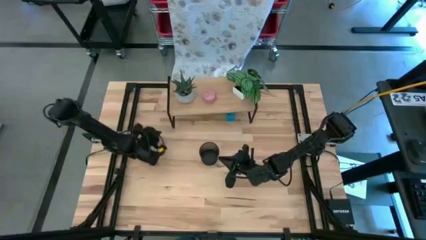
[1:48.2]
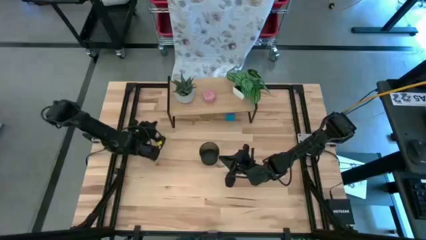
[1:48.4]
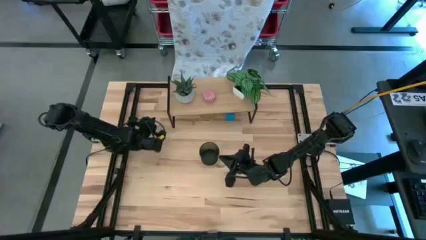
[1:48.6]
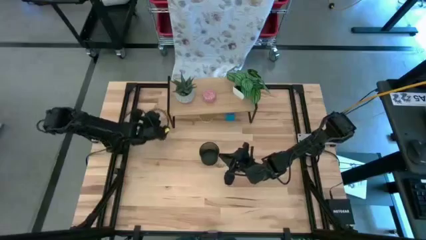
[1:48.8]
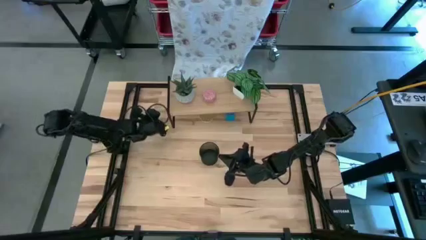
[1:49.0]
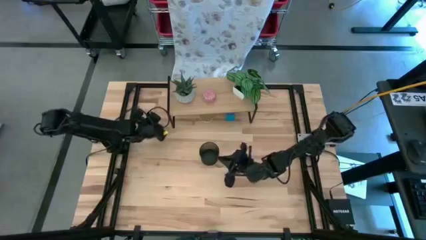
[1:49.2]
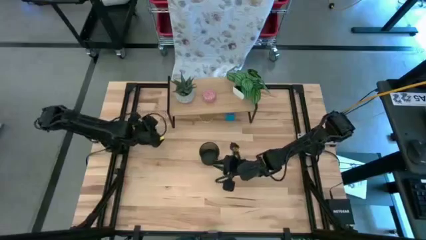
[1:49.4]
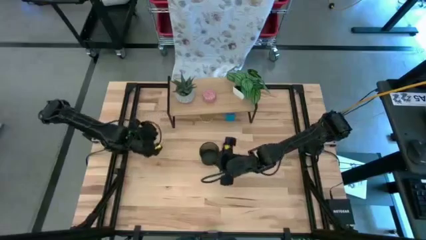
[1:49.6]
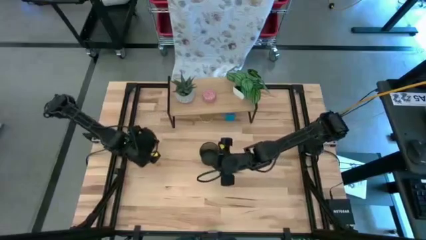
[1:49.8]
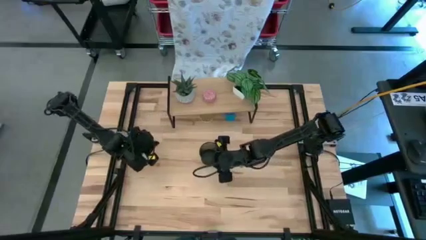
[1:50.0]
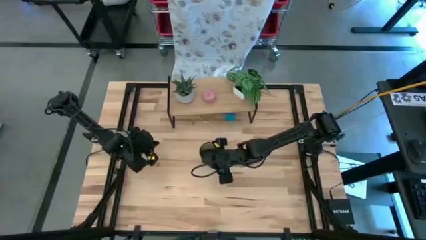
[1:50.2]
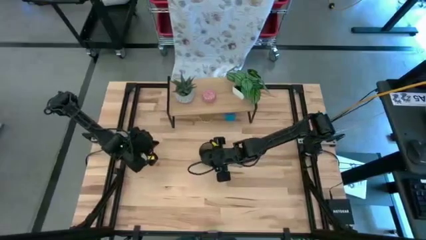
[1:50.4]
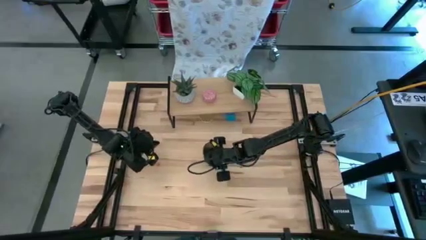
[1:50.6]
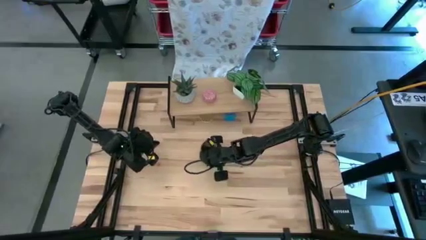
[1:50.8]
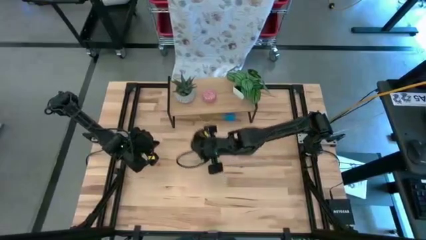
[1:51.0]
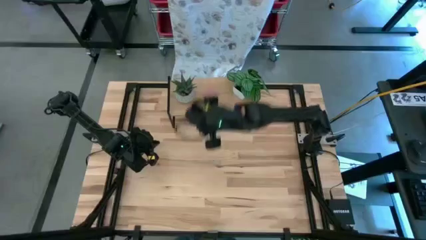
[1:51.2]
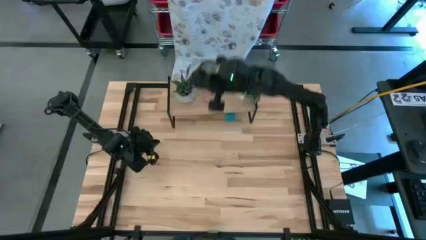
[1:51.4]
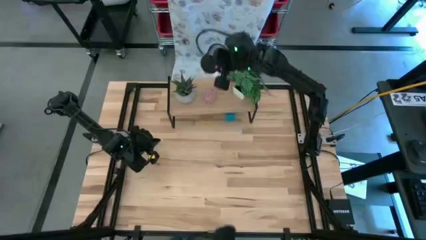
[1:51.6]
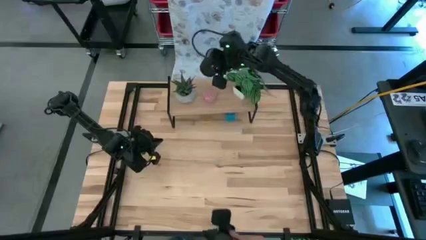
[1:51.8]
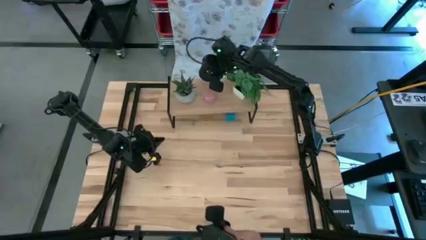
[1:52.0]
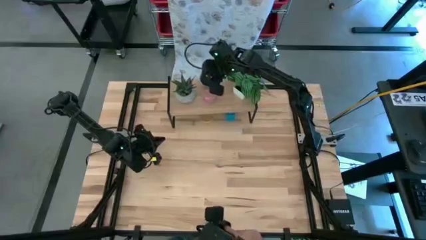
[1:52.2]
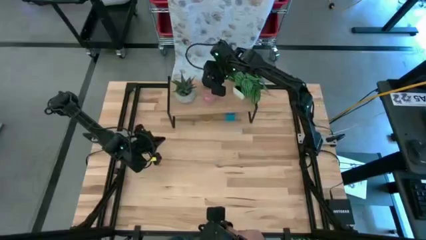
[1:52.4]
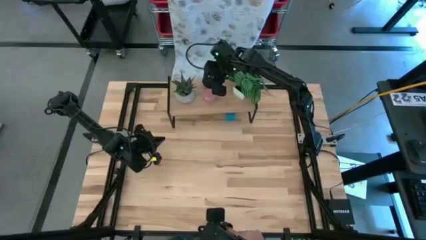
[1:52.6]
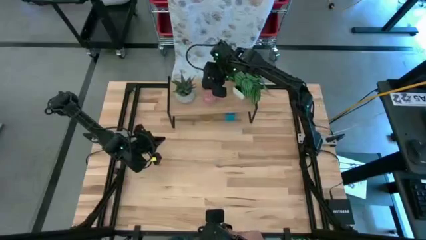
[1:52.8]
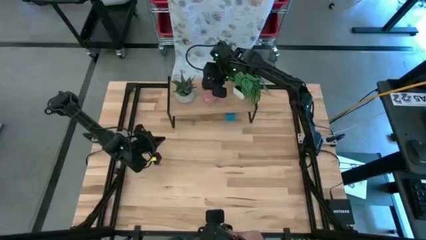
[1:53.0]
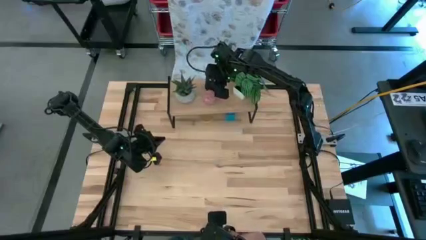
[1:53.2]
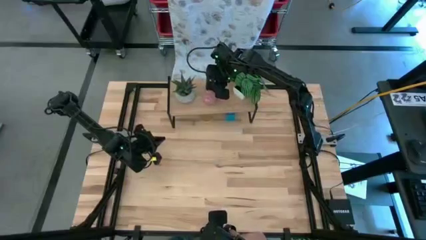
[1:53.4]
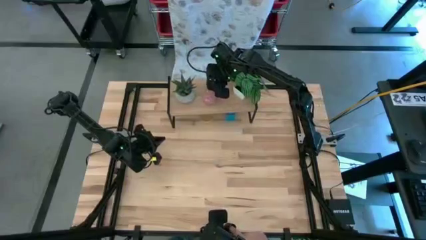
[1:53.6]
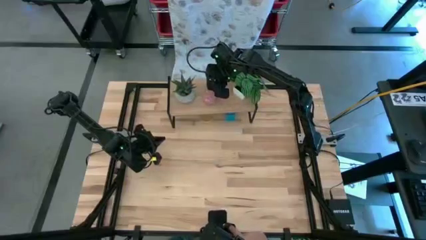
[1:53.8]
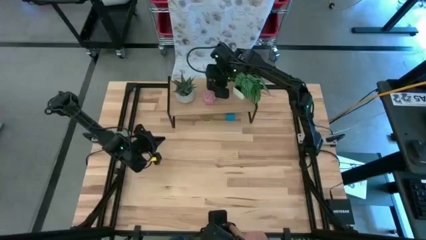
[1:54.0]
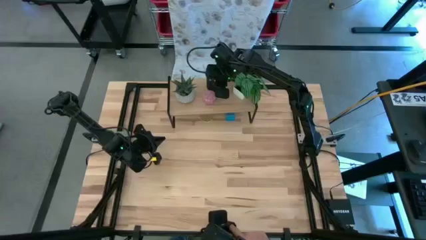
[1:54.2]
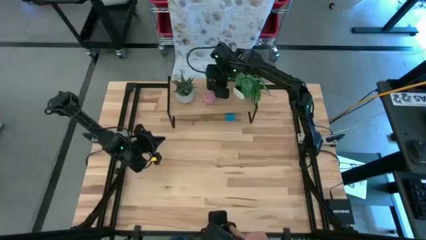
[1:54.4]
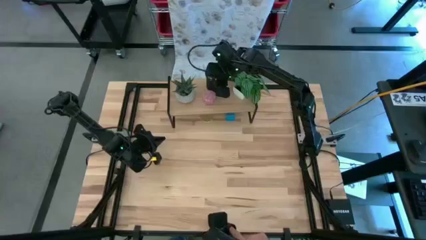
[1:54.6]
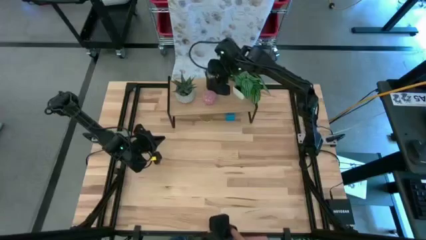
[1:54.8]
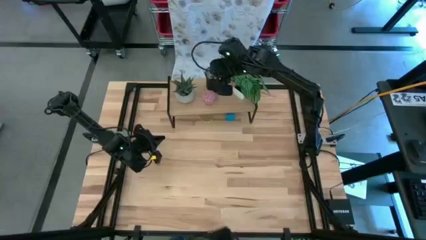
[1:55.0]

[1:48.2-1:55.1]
Task: Stock shelves
Put the black pen holder on the shelf

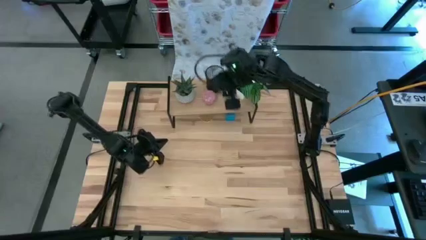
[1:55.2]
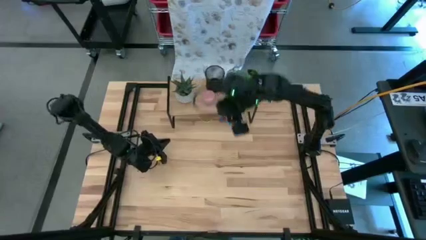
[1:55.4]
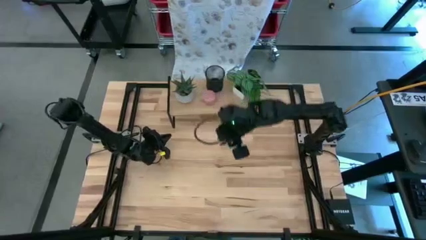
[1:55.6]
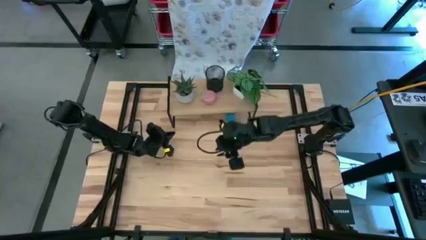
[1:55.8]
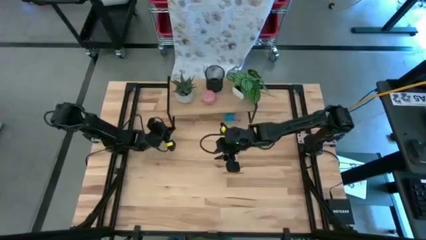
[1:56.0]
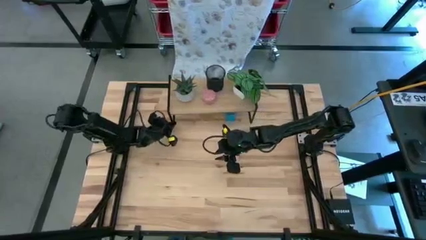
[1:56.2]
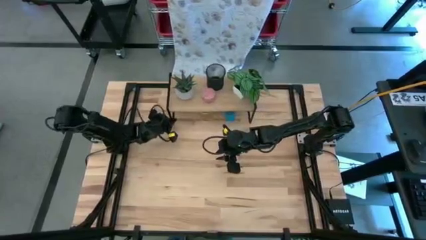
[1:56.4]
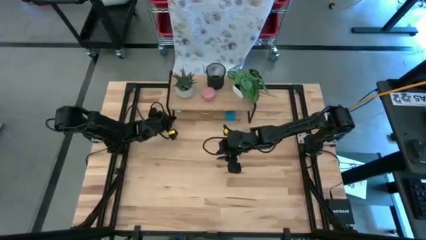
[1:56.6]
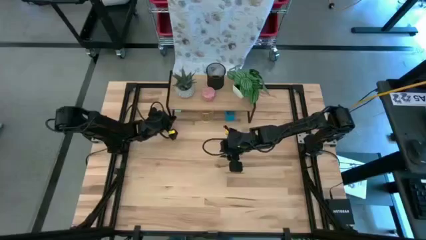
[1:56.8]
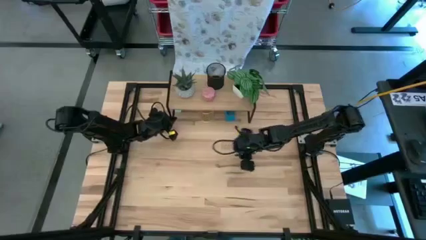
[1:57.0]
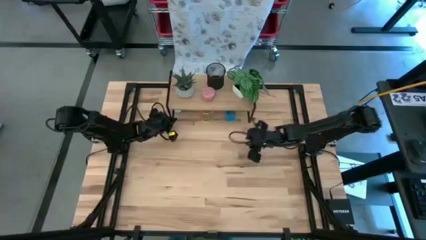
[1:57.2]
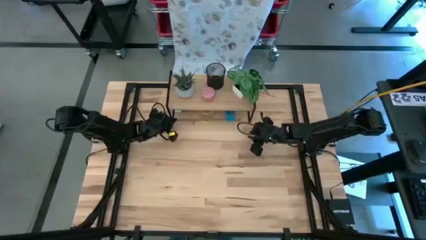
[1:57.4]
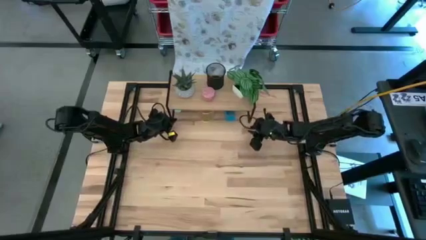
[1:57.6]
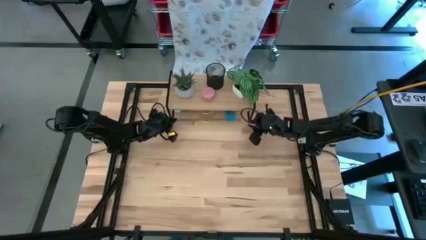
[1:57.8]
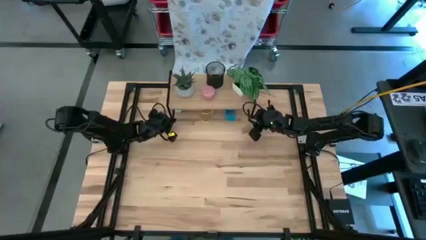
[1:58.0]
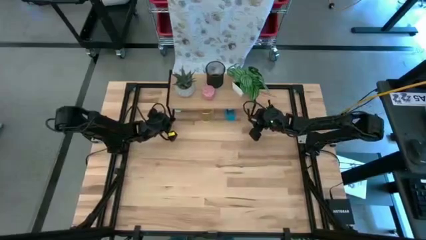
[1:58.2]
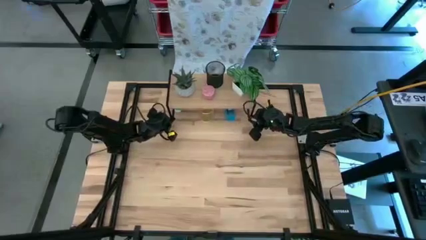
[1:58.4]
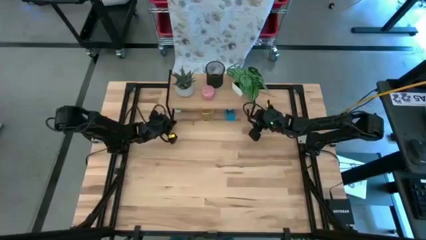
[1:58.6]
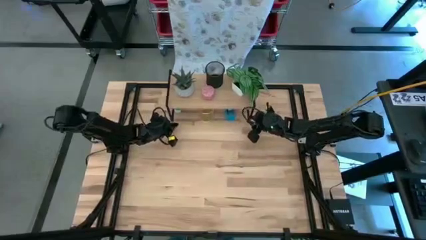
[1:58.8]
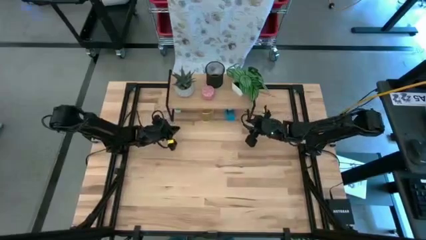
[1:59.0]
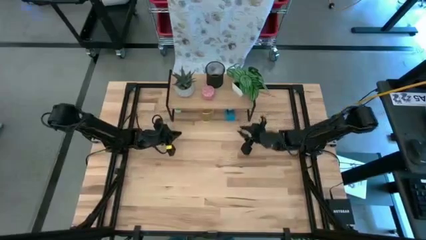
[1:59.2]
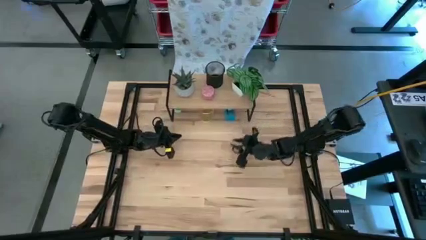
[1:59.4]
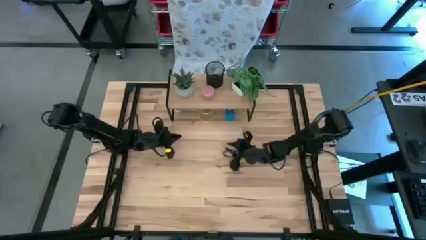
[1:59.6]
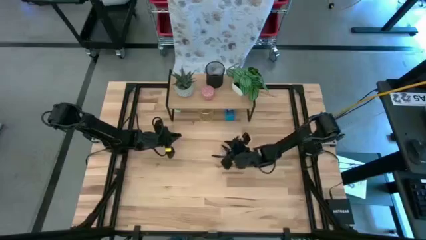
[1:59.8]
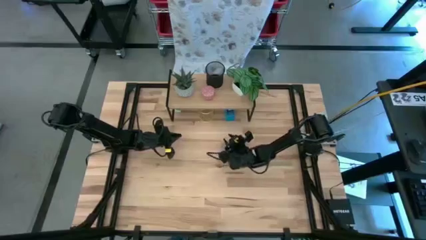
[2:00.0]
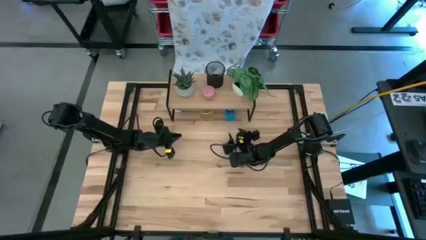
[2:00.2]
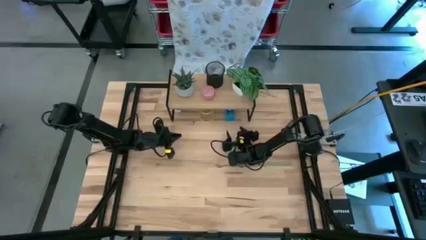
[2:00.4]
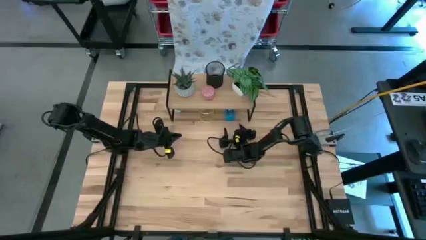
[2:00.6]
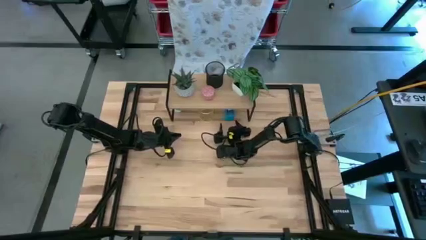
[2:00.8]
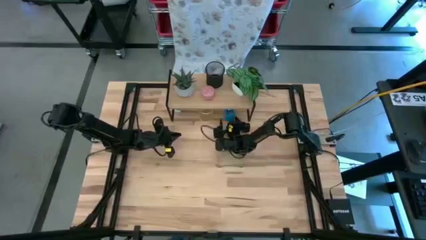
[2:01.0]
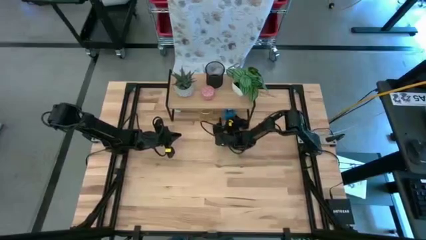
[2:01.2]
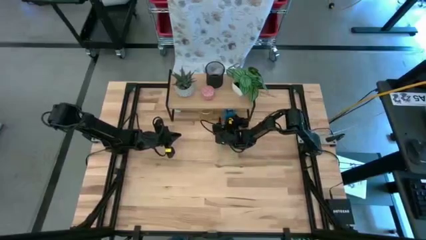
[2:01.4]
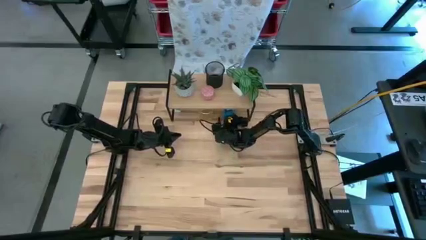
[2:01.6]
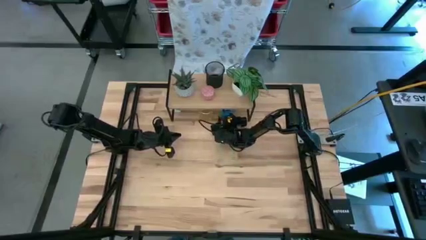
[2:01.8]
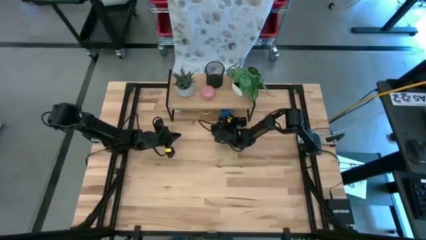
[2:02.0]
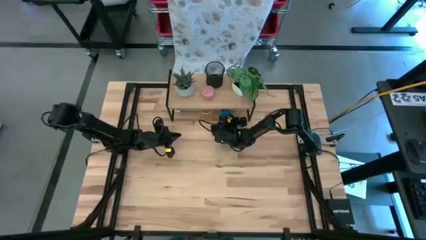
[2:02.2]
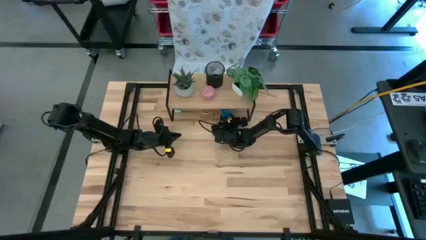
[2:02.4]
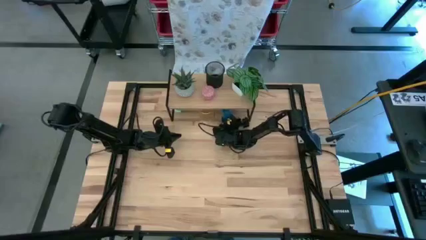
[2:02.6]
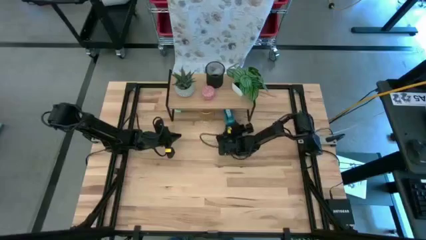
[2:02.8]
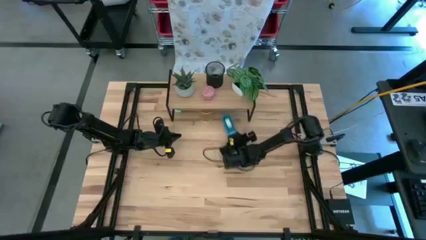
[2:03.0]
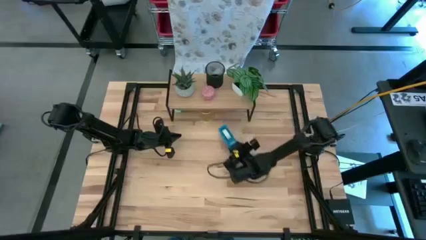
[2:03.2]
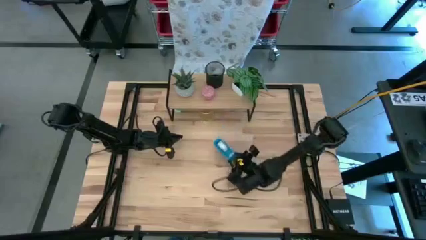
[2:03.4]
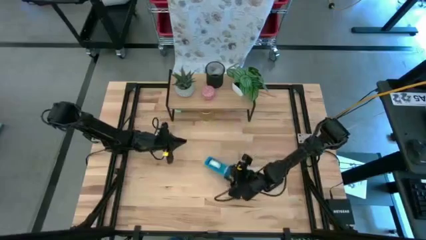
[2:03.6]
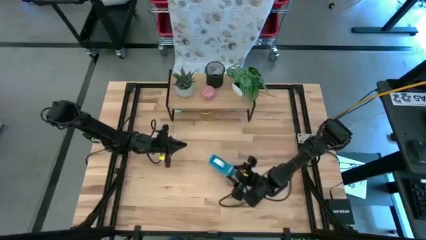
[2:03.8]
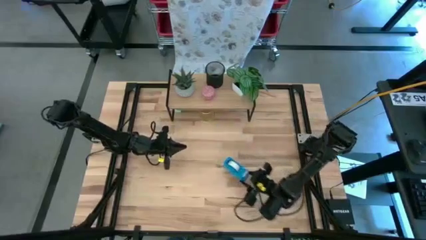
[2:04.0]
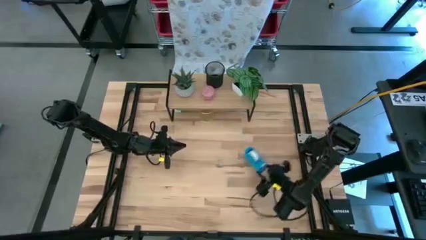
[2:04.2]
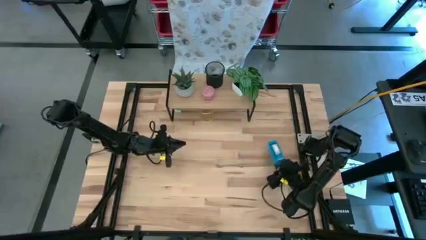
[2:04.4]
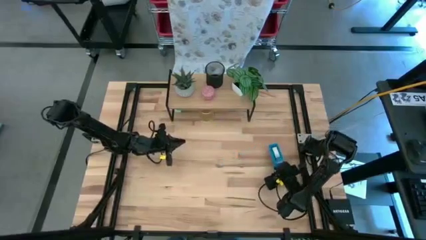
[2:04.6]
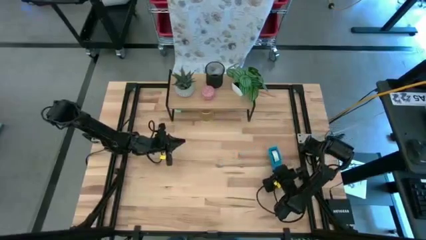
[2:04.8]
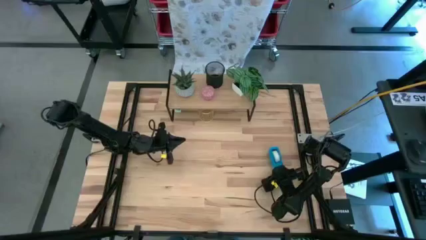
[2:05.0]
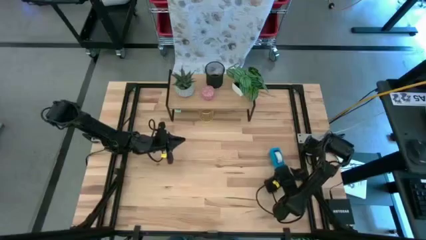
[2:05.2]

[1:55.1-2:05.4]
Remove the blue dispenser holder under the shelf
